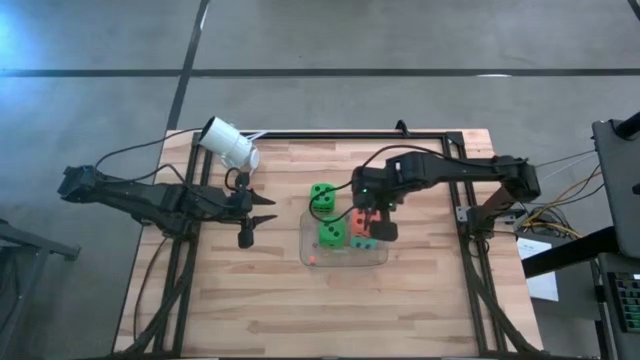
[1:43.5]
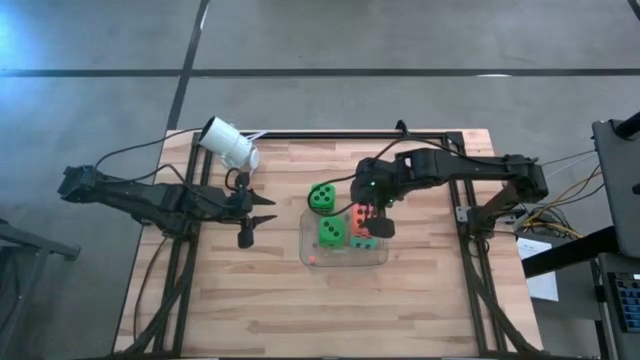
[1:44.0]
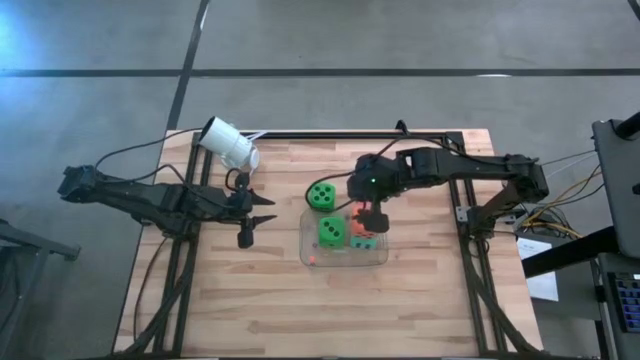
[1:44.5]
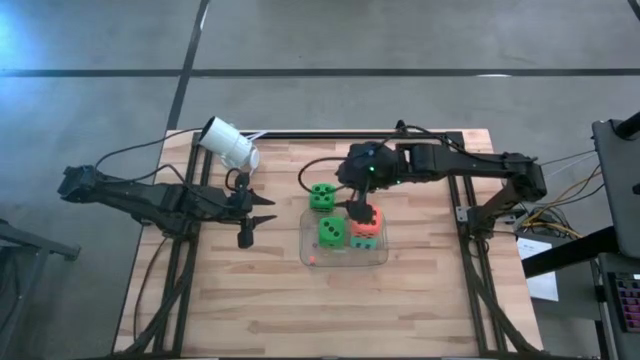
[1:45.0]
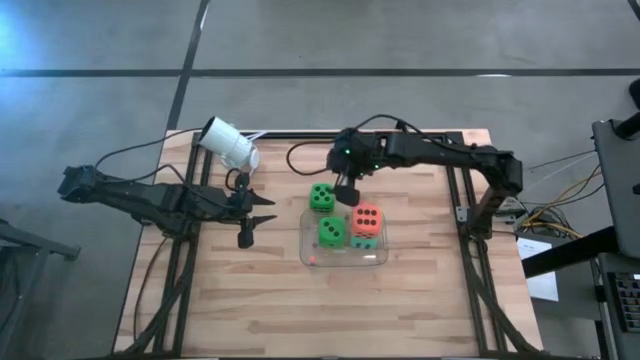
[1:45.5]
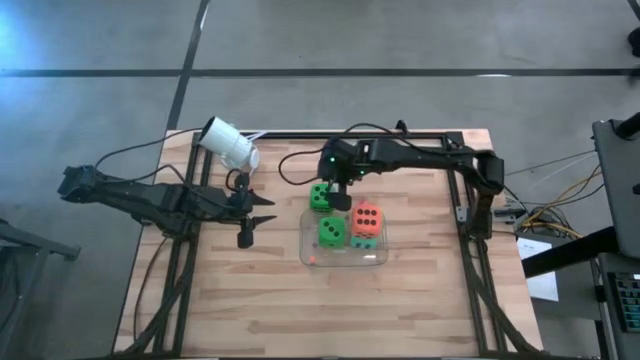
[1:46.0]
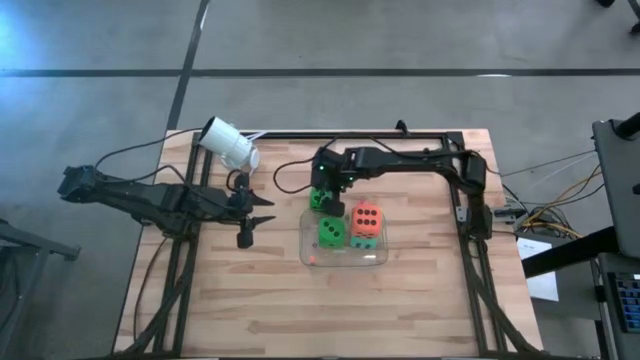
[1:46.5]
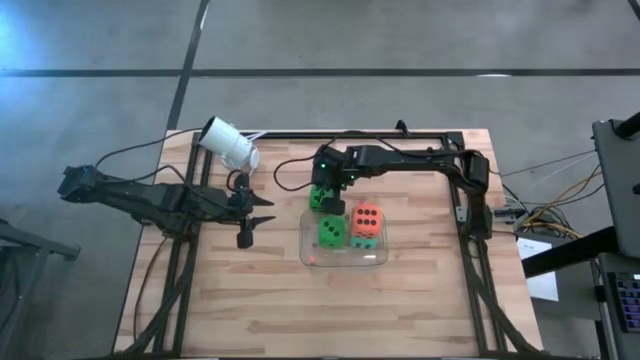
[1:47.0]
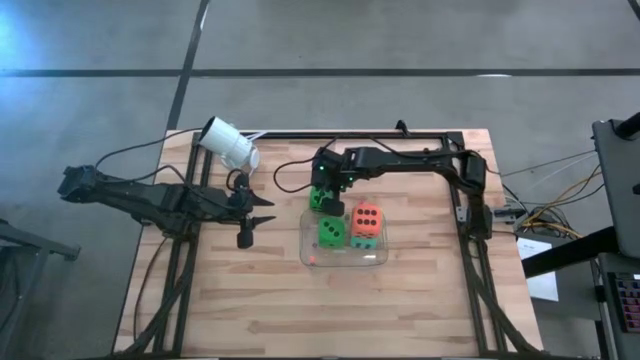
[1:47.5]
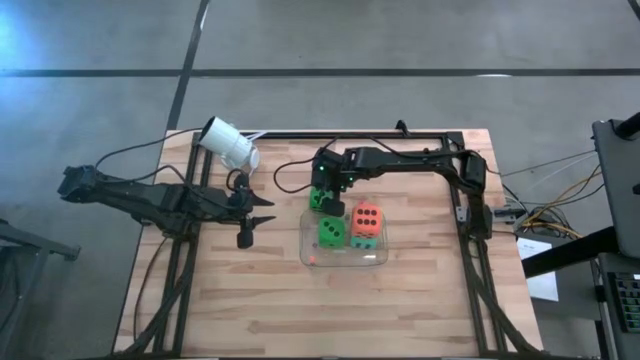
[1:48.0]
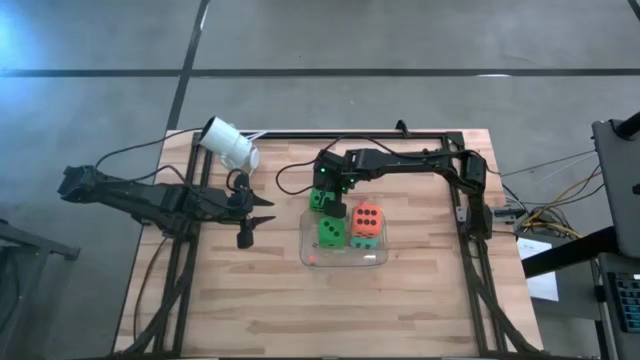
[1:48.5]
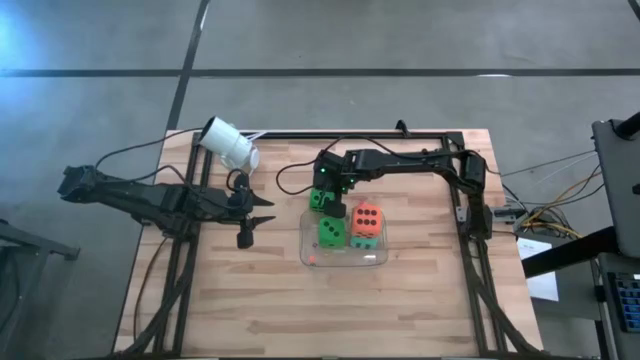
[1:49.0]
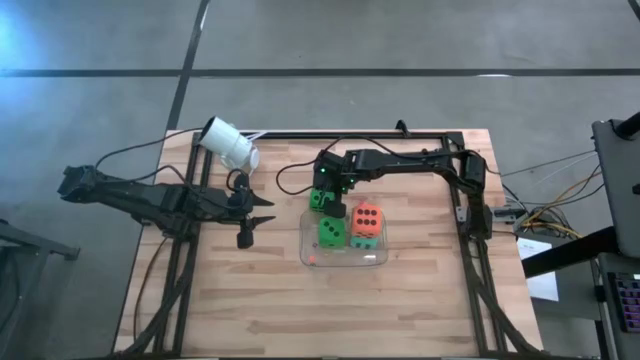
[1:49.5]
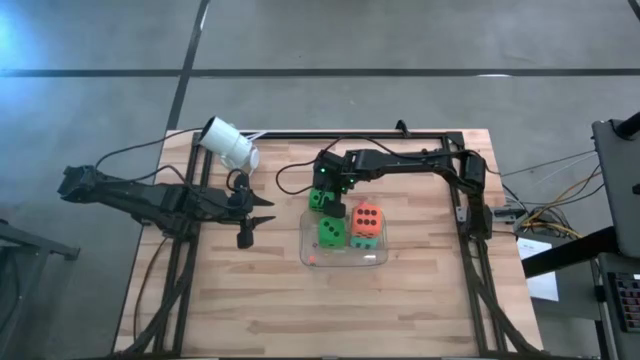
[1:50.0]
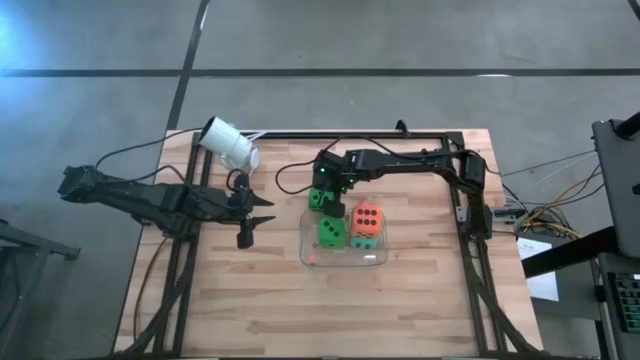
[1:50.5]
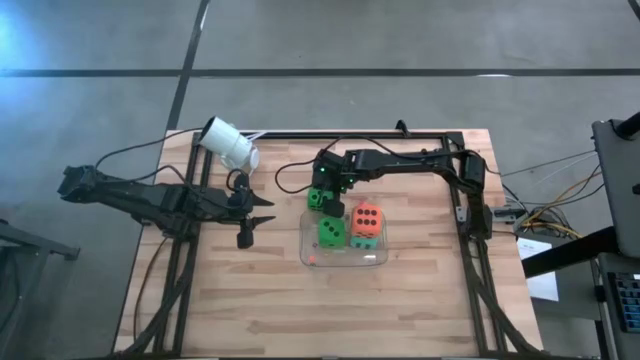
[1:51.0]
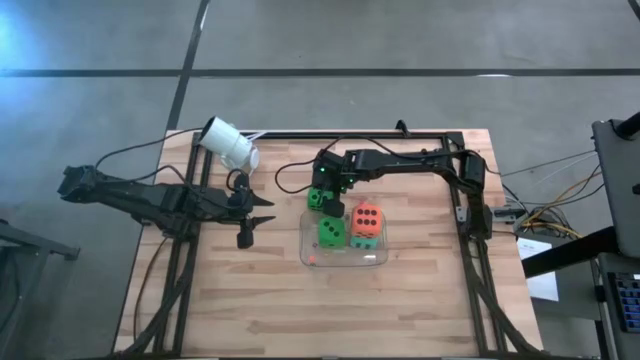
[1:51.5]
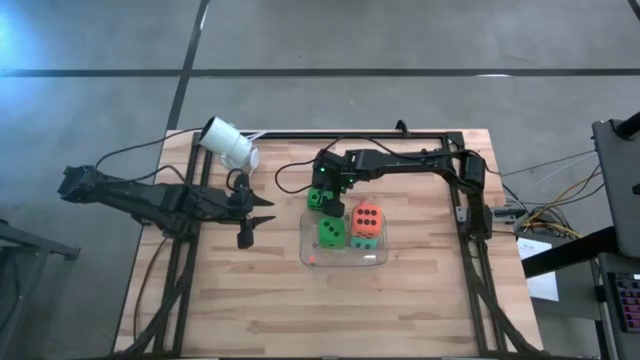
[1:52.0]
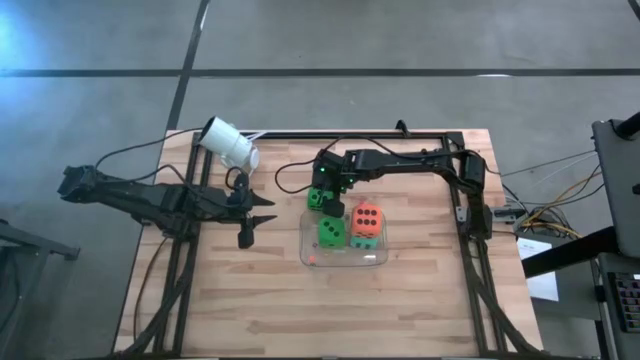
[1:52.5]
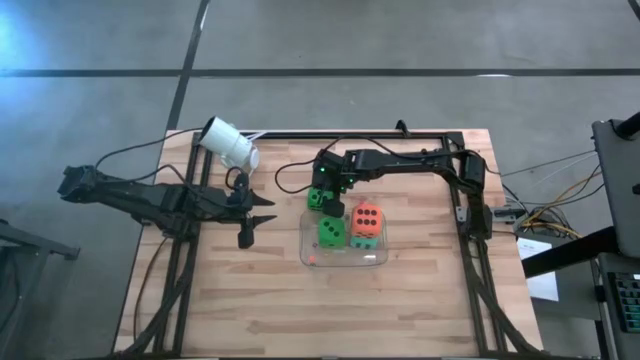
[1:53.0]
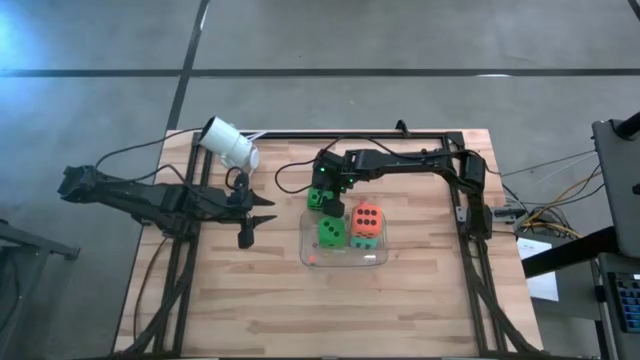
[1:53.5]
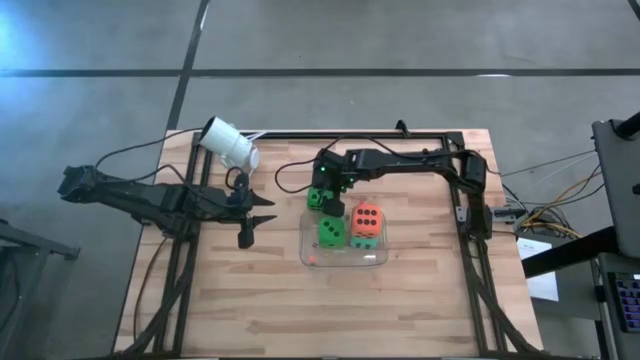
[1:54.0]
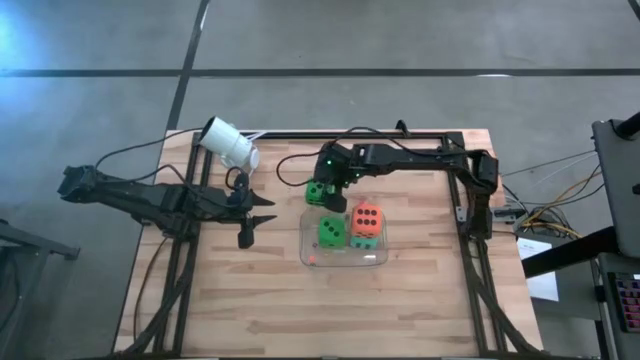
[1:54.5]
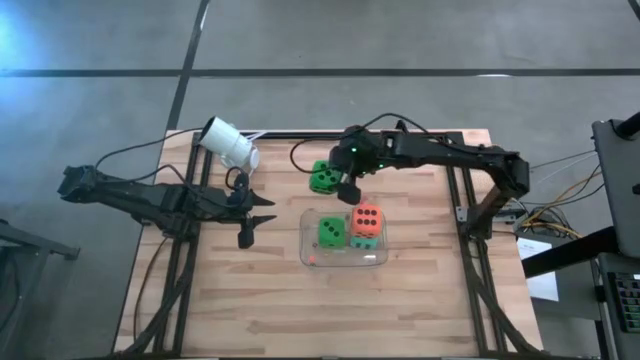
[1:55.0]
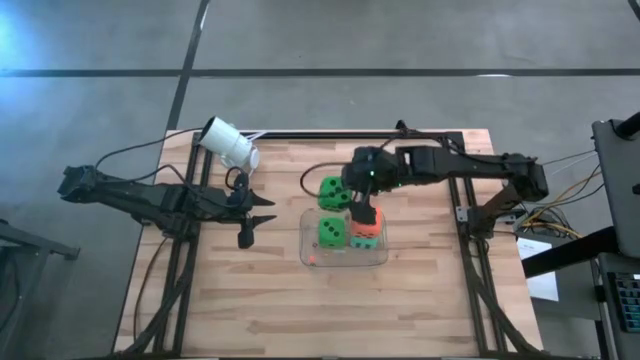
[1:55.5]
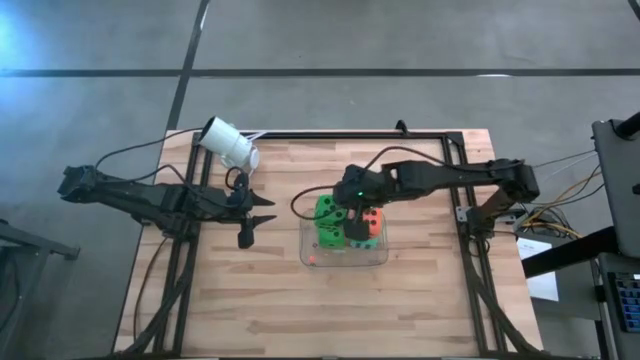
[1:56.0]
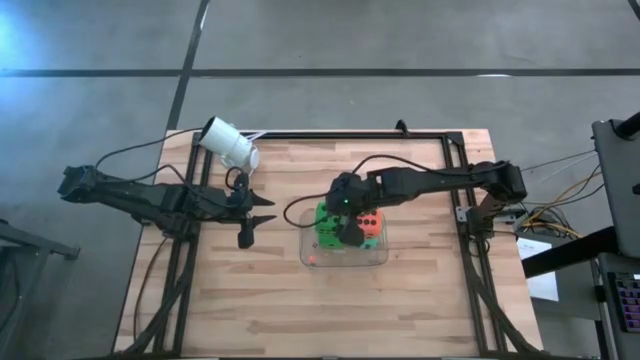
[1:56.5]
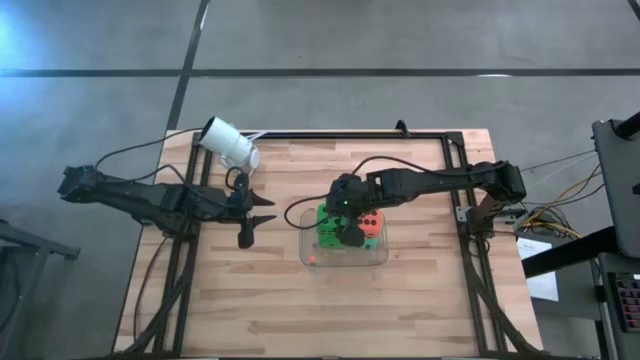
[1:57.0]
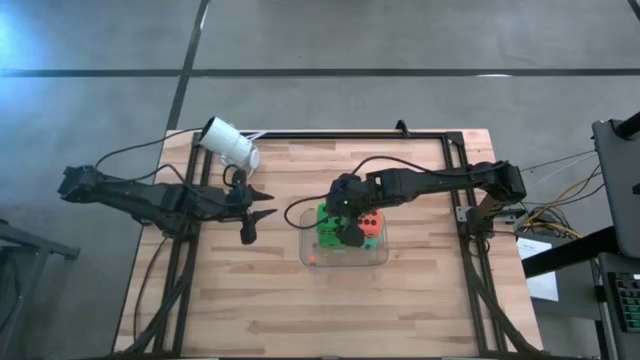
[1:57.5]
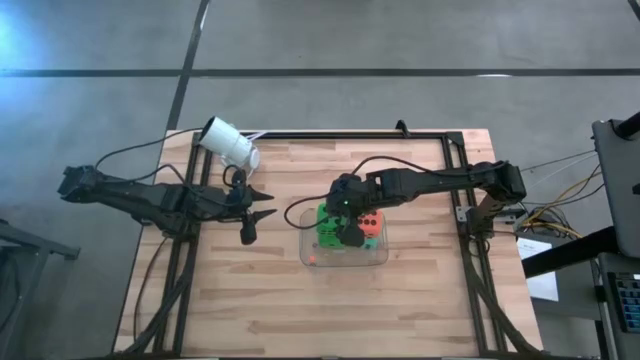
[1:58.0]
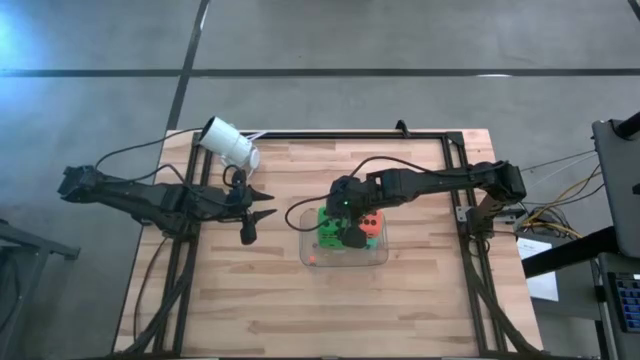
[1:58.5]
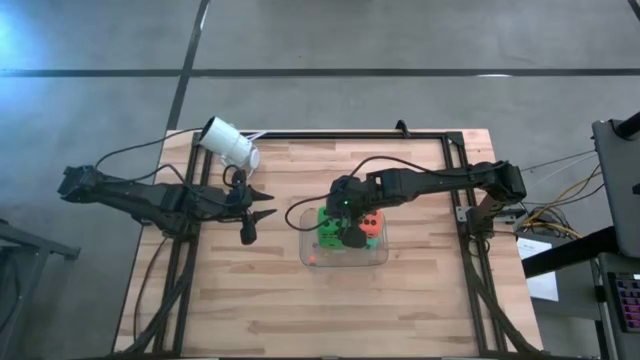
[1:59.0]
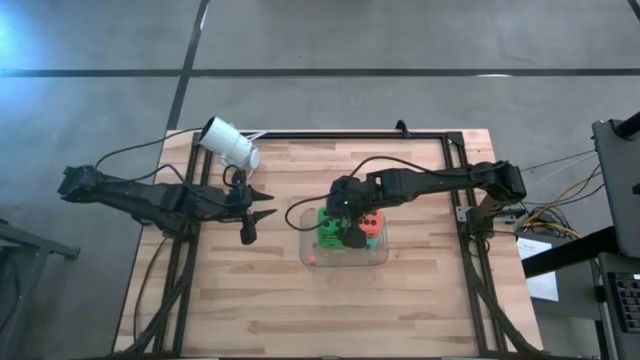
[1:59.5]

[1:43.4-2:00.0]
Task: Pick & Place Dice
Put the large green die into the transparent bin

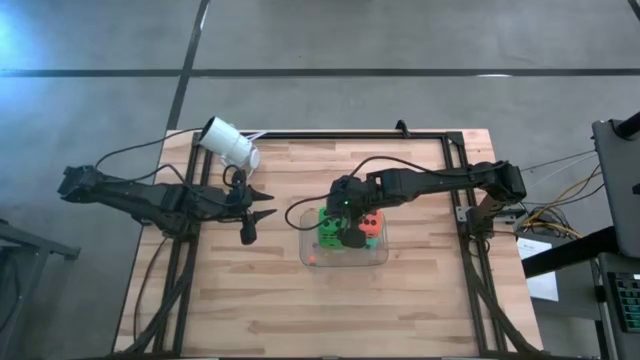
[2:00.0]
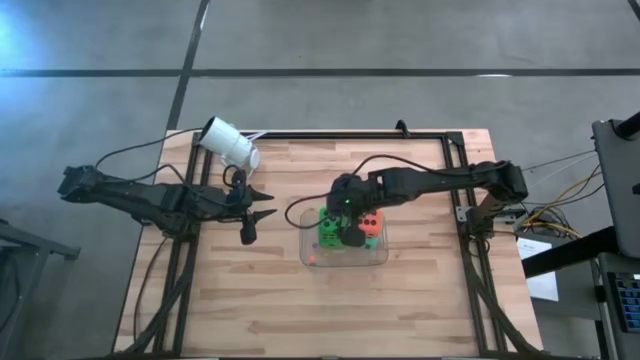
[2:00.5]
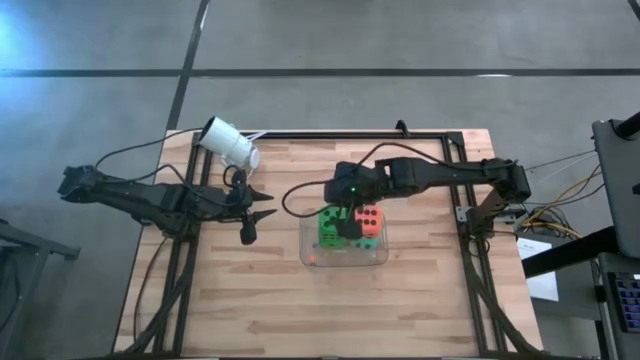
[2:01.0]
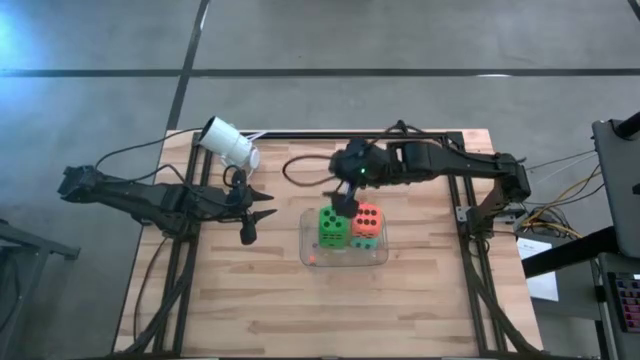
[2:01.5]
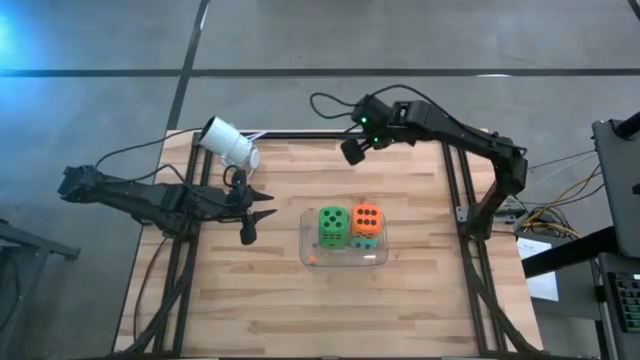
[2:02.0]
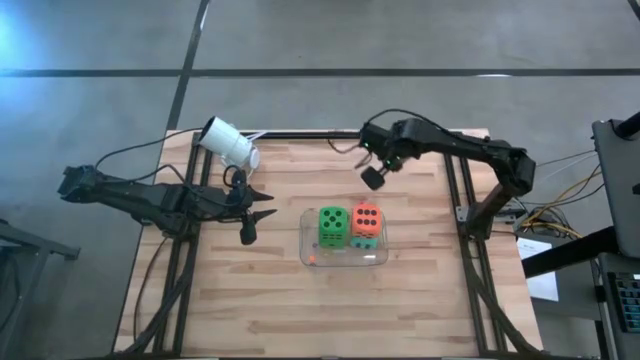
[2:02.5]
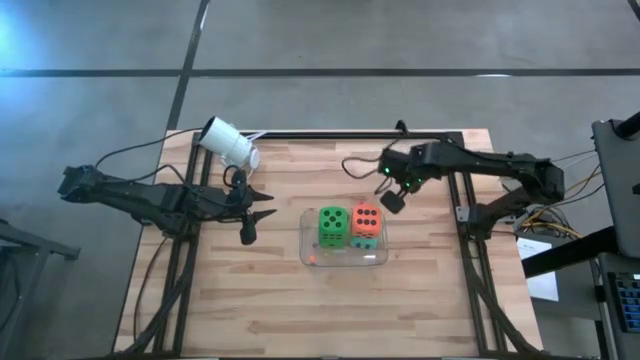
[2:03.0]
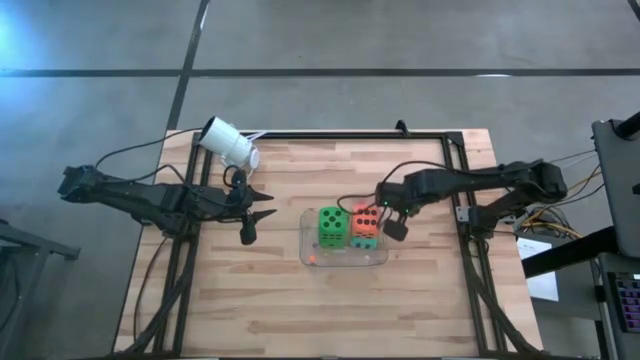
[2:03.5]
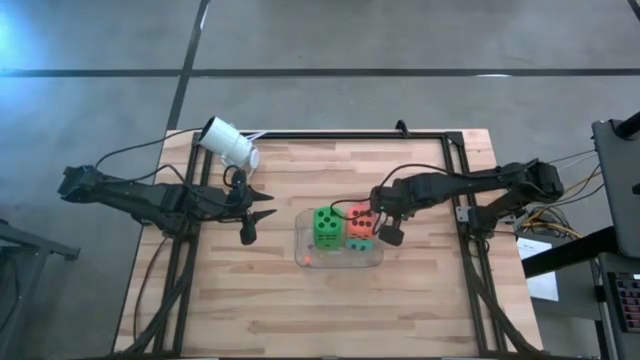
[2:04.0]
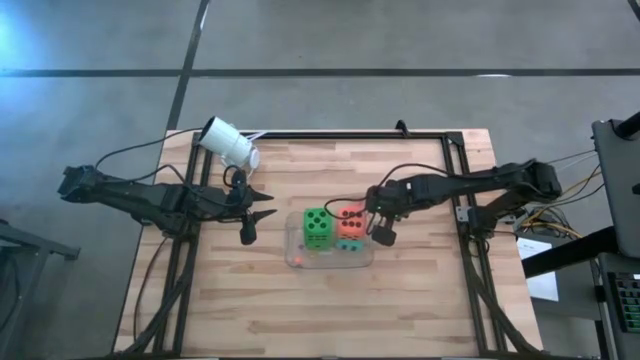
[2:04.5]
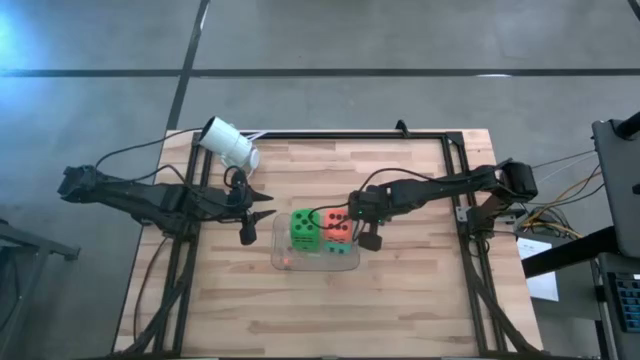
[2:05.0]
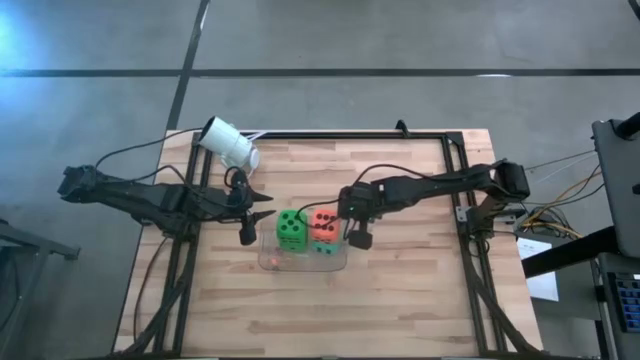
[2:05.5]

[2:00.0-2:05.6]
Adjust the transparent bin
